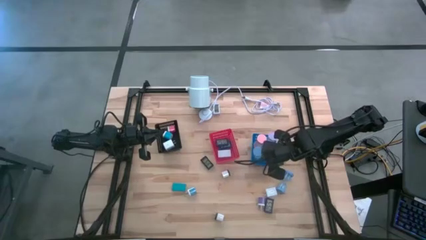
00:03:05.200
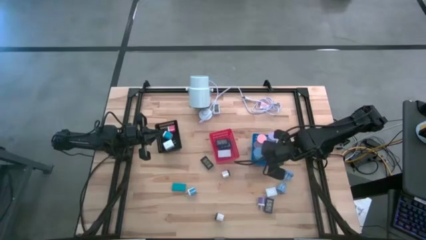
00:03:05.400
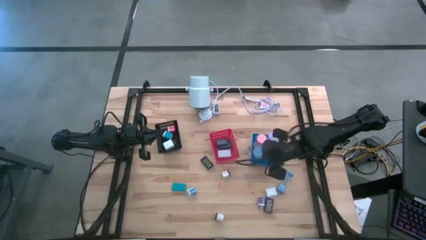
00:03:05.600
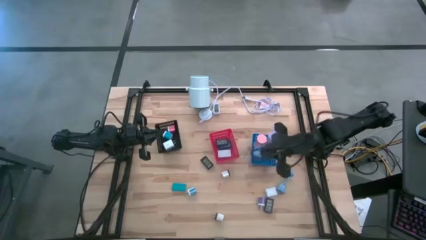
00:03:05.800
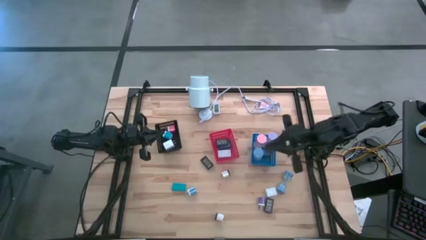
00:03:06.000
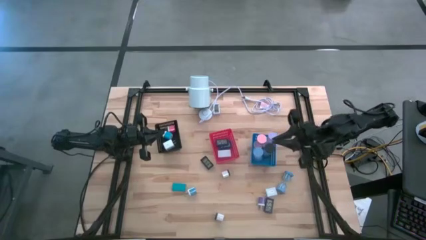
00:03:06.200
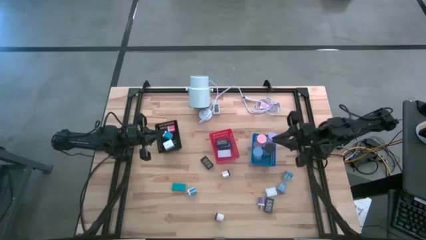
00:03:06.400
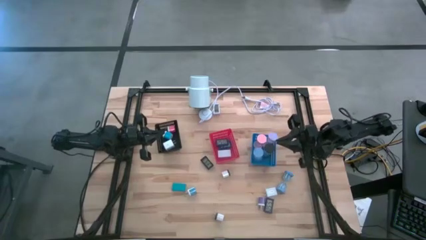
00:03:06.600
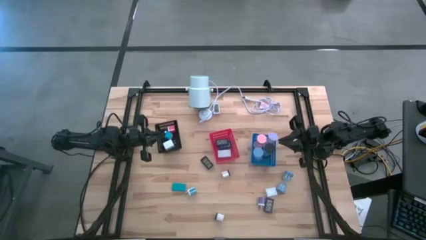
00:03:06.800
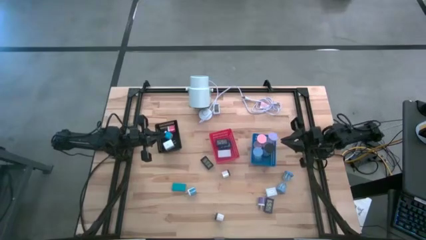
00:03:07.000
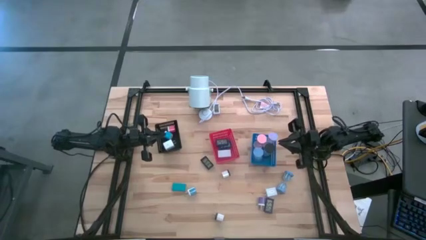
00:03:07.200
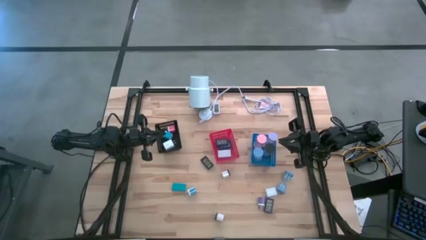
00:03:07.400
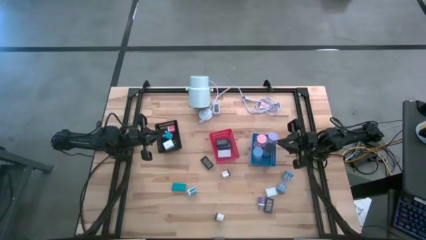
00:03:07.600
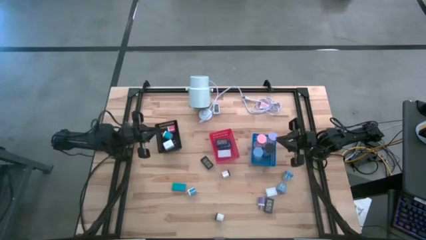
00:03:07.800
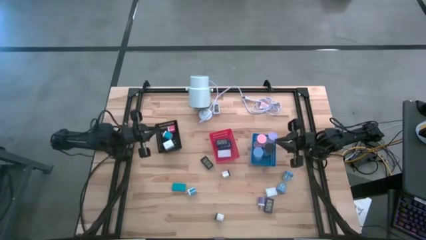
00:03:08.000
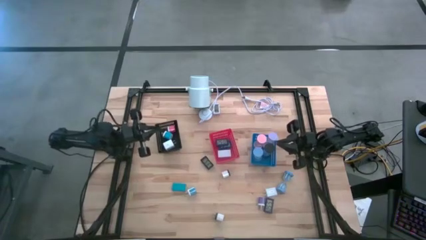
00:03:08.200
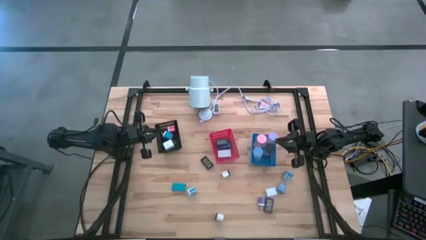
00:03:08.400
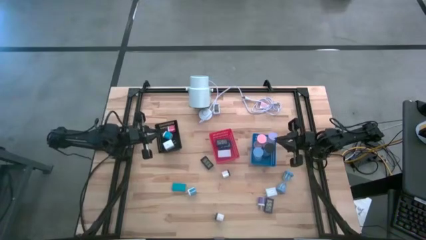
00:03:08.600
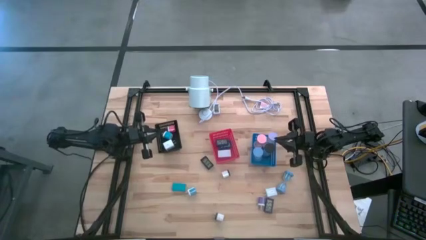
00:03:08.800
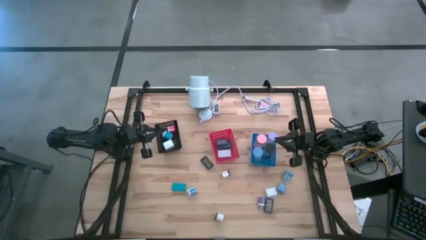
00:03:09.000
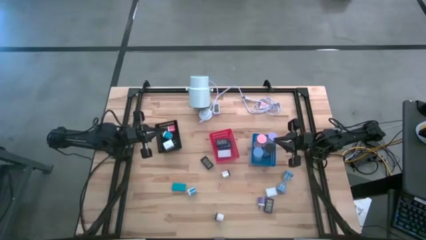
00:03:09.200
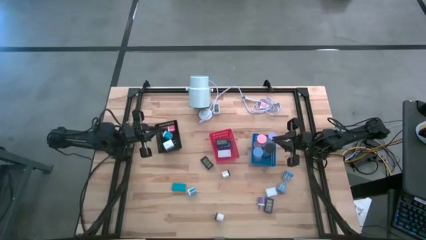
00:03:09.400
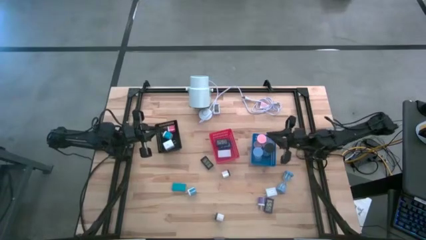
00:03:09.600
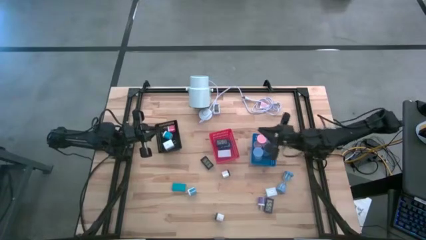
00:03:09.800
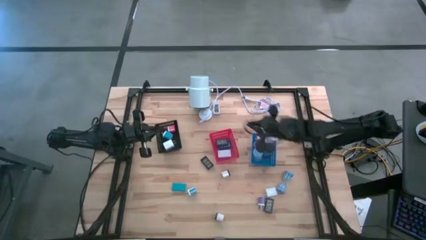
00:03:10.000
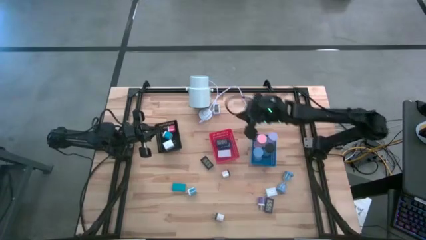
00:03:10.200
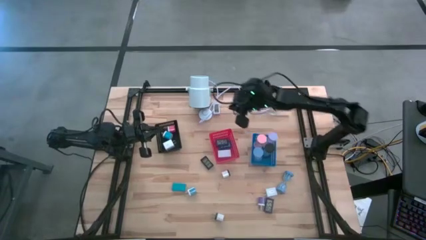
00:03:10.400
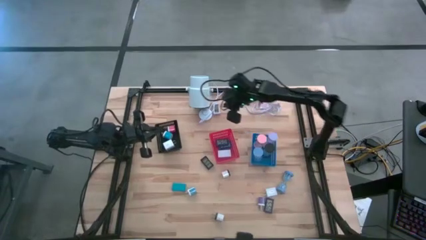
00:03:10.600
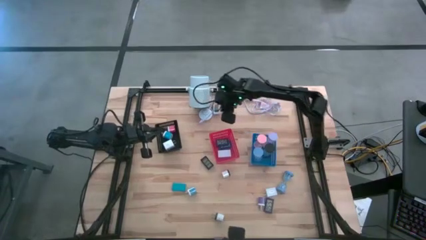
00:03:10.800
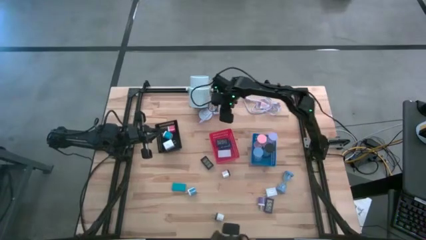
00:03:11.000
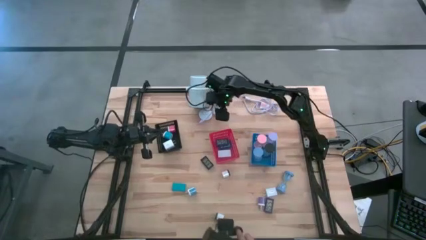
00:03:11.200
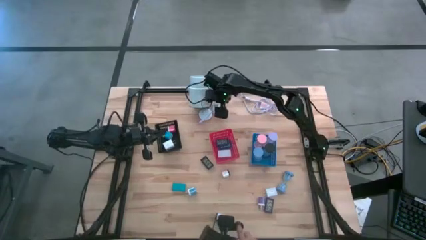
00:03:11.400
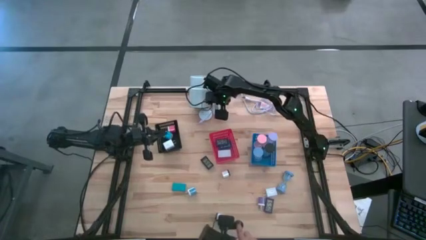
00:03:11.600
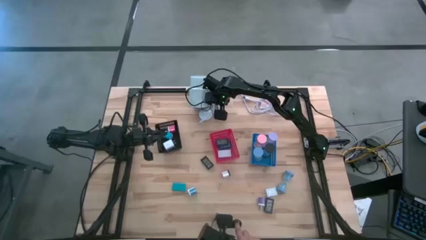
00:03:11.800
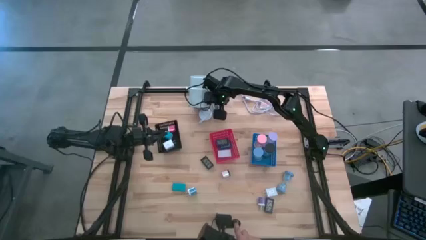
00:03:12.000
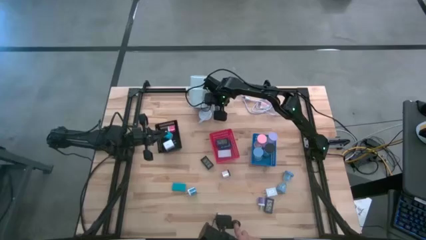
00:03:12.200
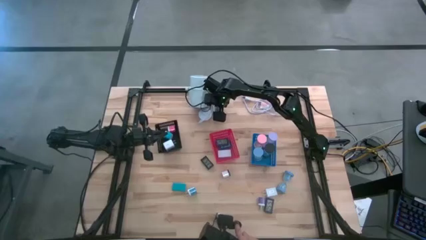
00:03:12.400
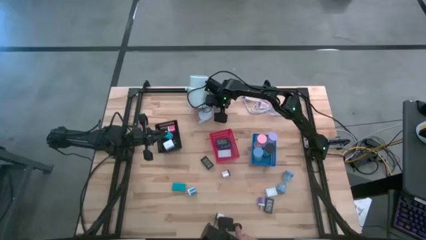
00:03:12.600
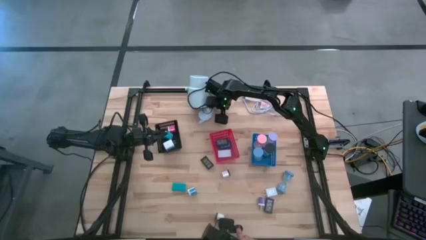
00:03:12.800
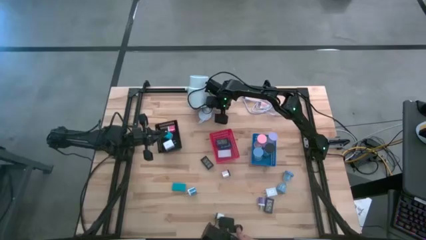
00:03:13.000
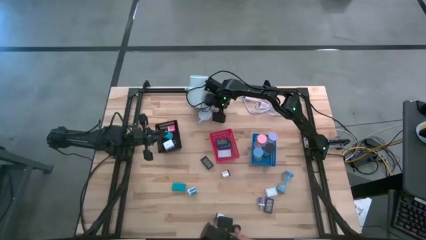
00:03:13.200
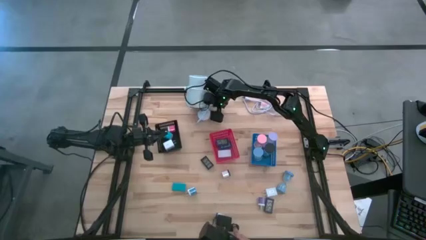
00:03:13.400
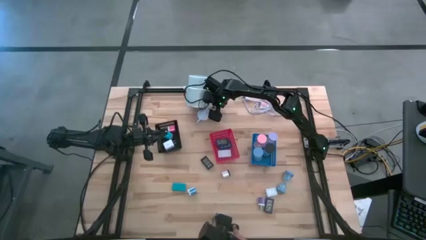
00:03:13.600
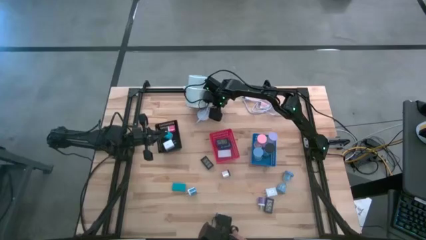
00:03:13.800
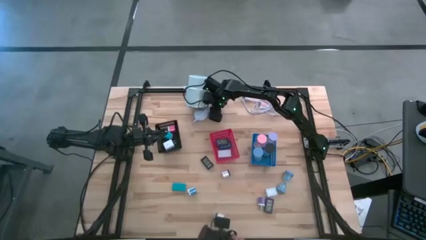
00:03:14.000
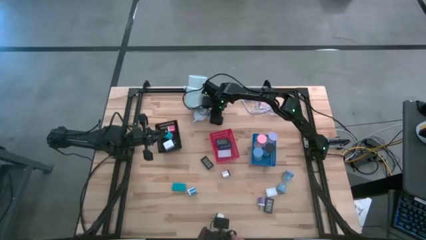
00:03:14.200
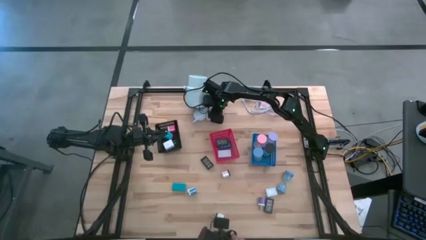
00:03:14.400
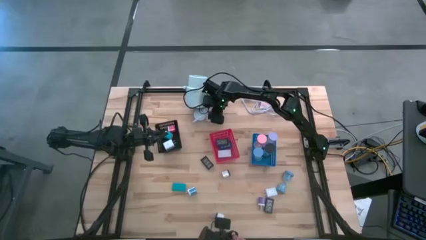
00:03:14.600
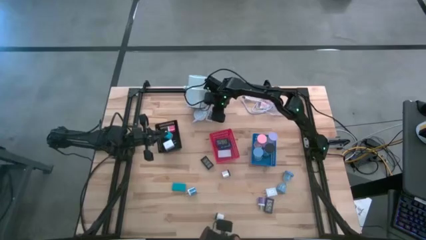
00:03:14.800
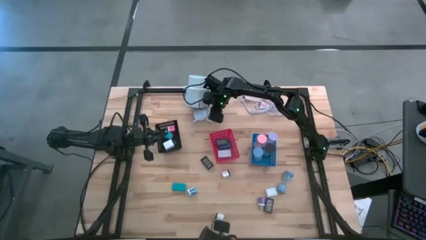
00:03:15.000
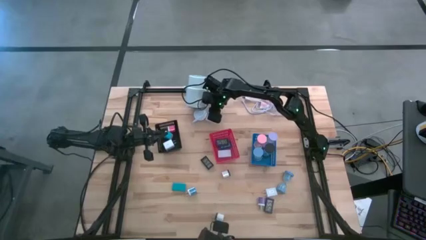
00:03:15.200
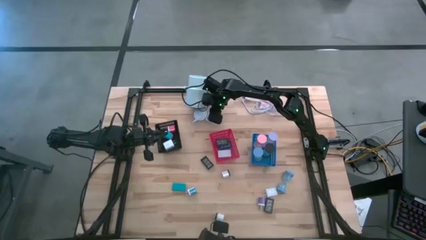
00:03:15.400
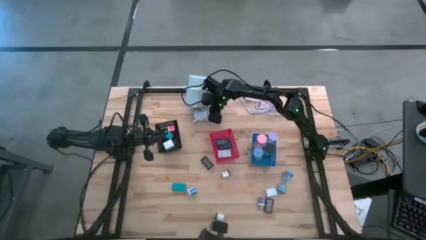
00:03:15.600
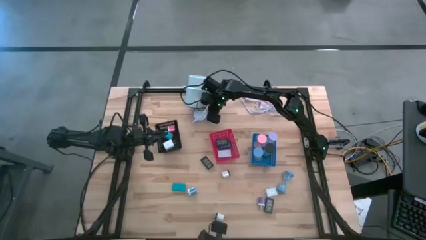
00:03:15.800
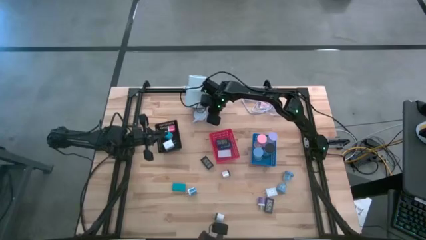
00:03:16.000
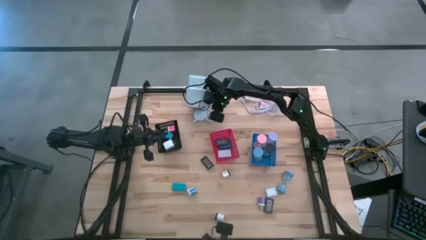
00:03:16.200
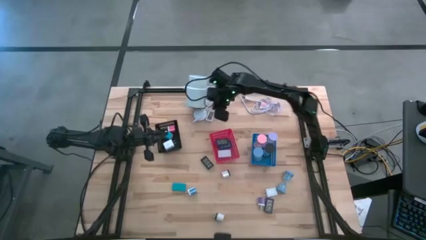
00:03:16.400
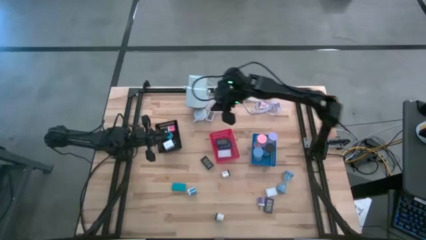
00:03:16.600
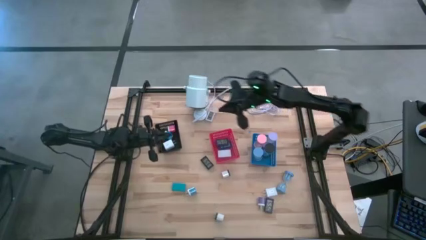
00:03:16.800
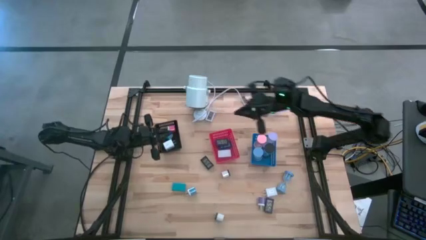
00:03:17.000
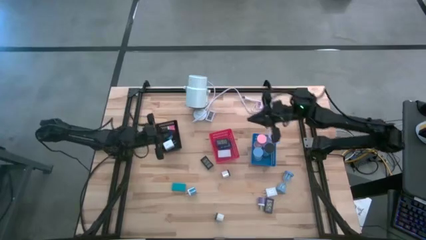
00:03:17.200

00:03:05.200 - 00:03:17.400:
Task: Pick & Place Office items
Put the white digital clock into the red bin

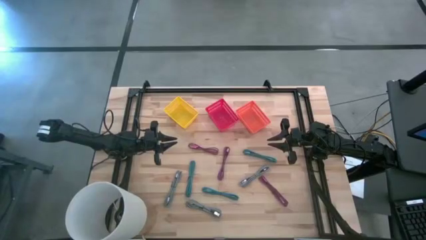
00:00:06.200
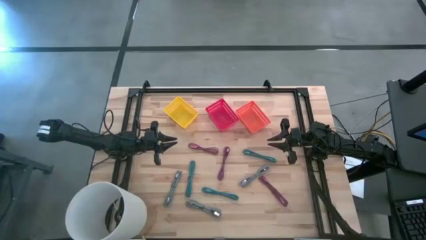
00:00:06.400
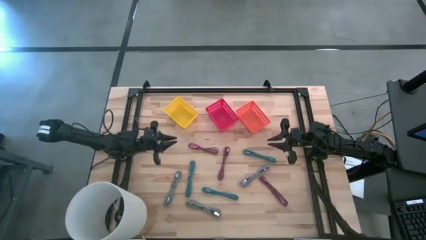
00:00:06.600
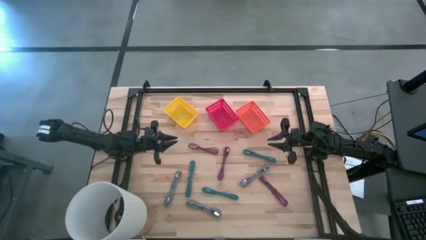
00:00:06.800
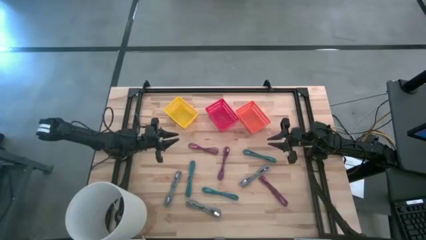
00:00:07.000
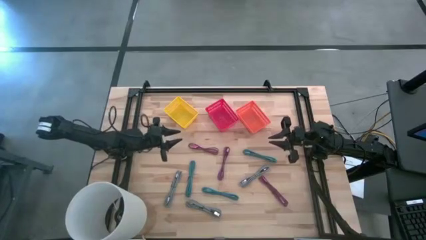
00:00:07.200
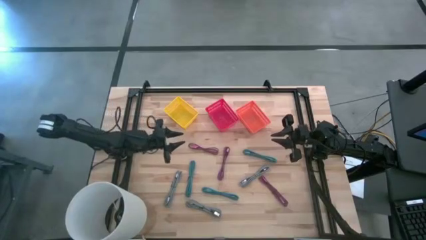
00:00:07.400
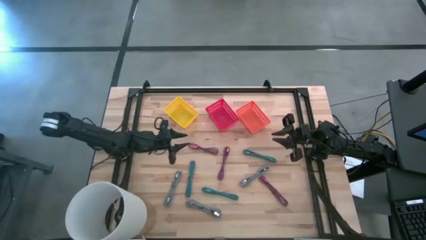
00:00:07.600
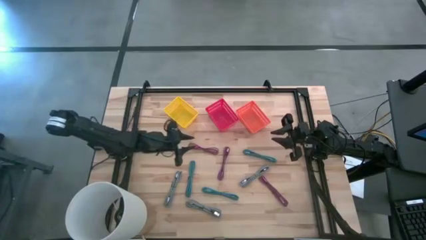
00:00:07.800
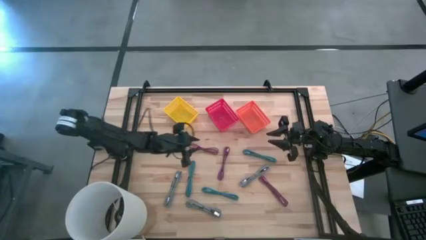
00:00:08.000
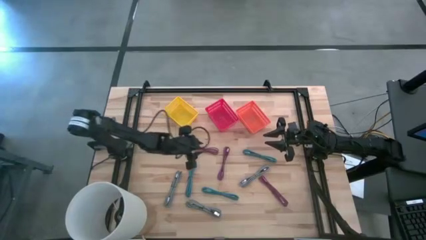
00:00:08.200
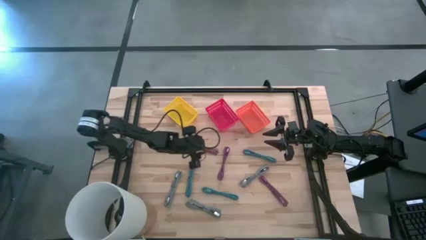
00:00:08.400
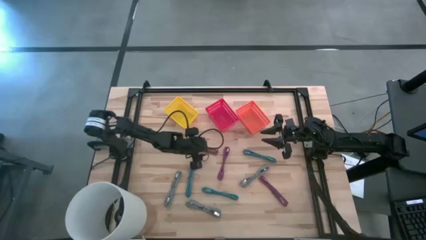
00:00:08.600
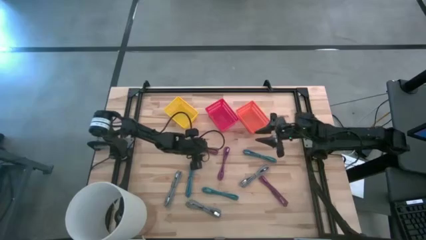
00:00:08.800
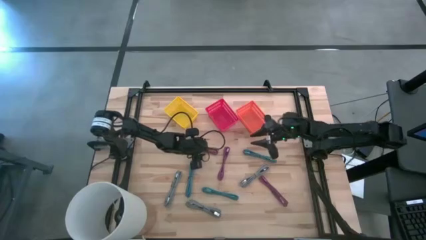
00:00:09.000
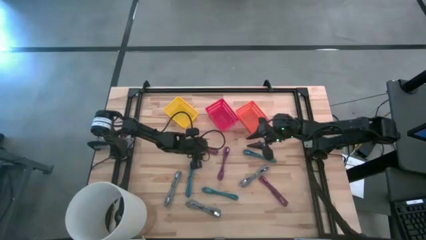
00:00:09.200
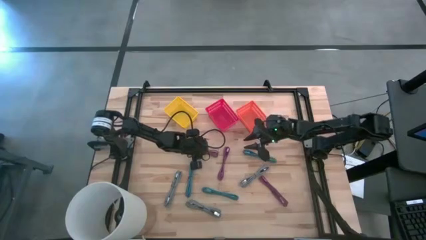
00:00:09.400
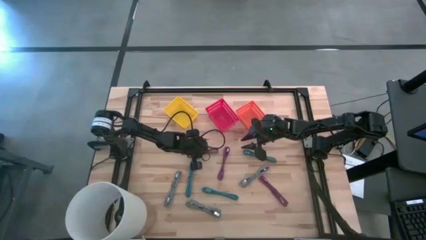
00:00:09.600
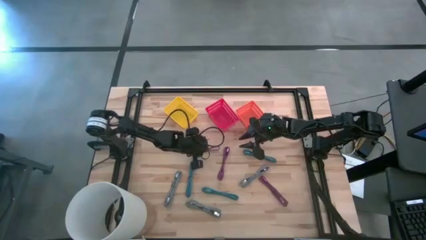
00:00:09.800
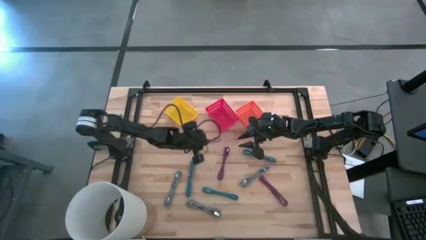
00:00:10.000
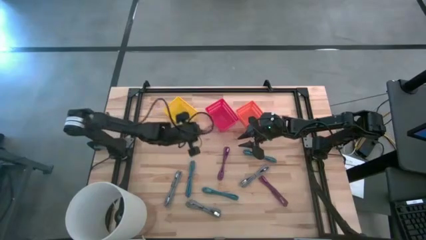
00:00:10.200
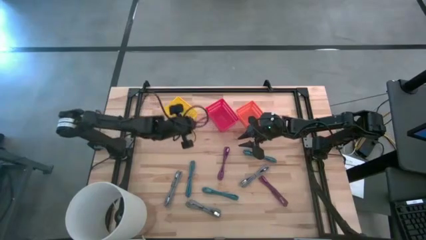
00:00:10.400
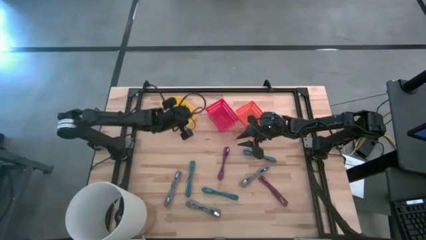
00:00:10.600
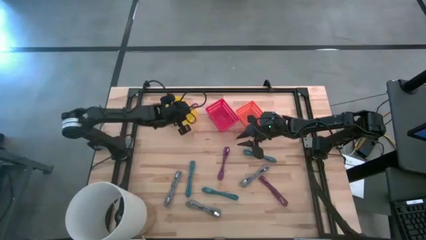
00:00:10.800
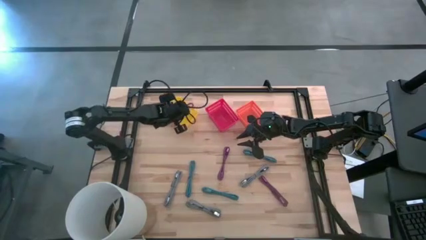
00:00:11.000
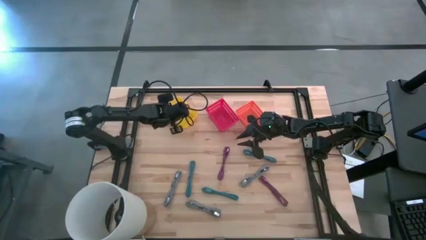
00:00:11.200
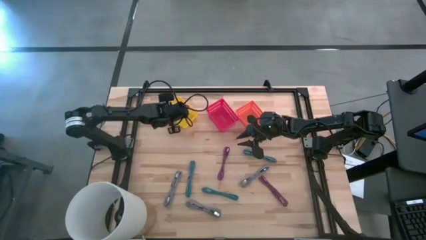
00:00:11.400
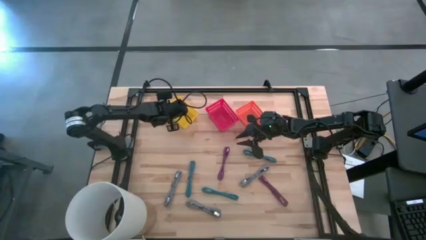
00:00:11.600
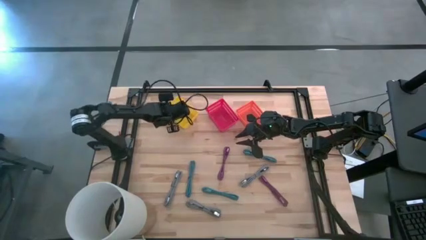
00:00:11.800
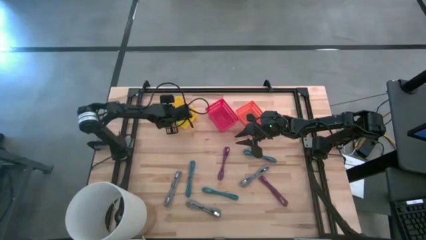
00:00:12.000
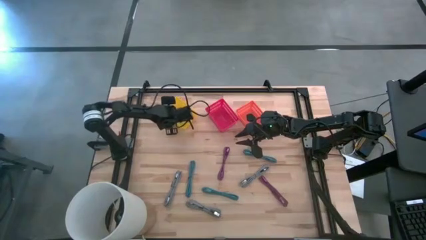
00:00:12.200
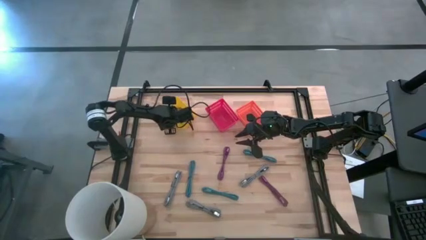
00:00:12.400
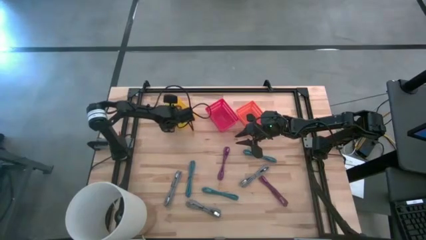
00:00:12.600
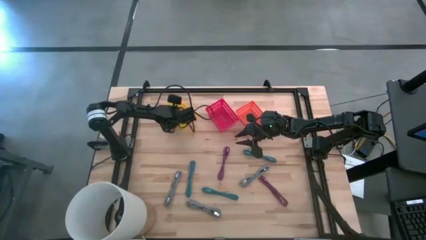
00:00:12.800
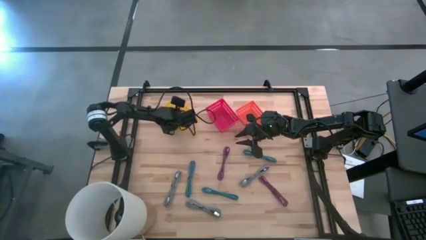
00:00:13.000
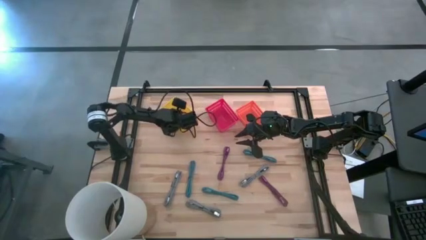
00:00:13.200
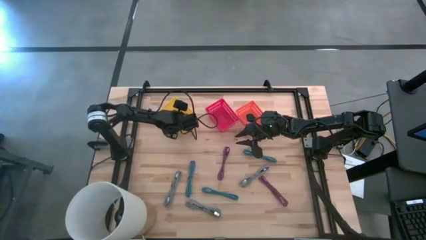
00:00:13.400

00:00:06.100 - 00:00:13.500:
Task: Pick & Place USB Port
Put the top black violet USB cable into the yellow bin
